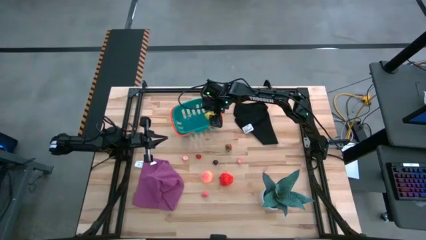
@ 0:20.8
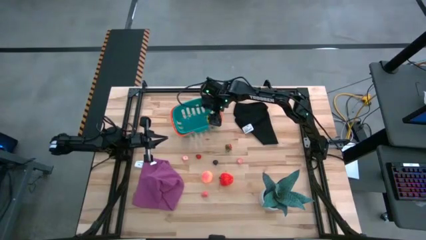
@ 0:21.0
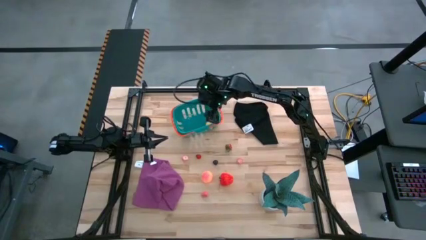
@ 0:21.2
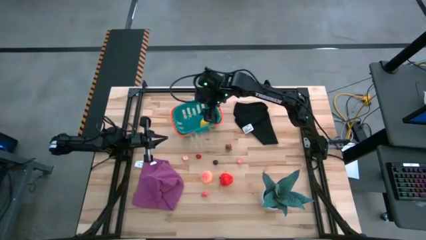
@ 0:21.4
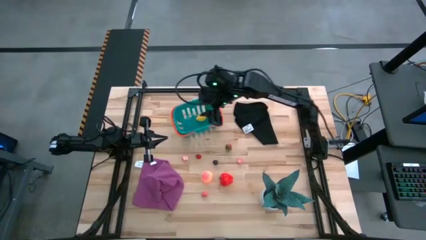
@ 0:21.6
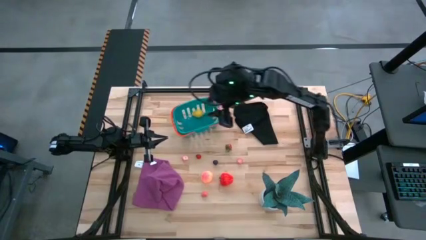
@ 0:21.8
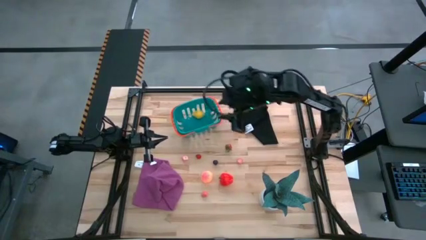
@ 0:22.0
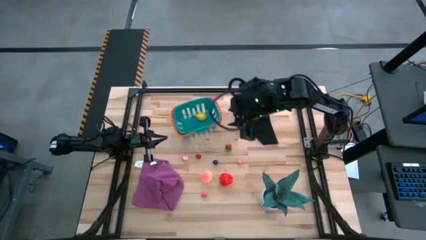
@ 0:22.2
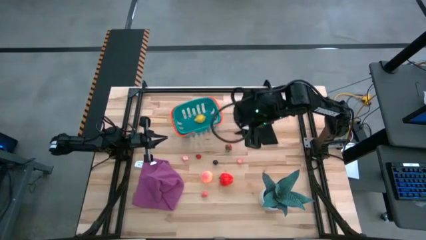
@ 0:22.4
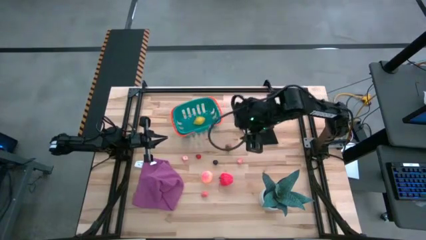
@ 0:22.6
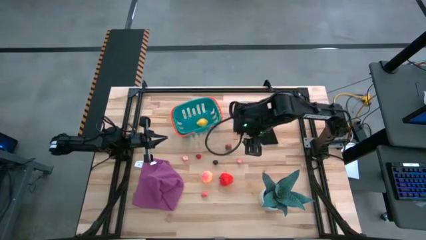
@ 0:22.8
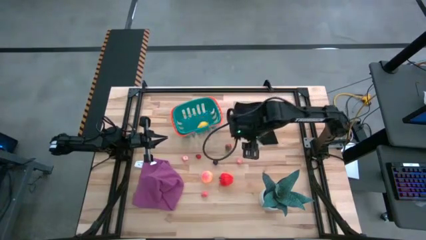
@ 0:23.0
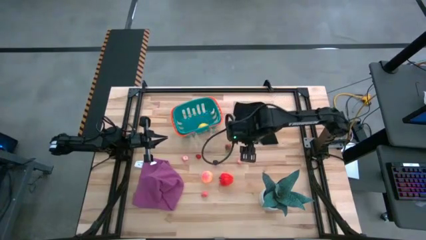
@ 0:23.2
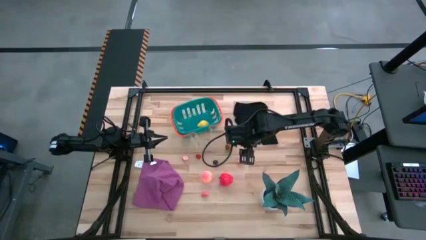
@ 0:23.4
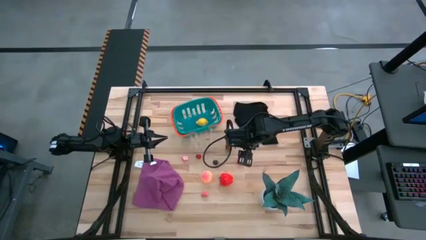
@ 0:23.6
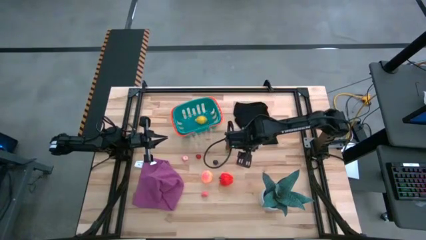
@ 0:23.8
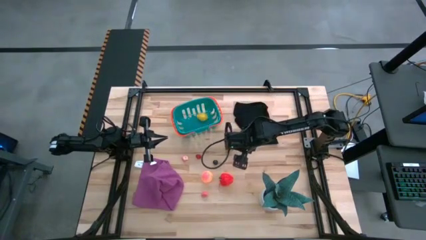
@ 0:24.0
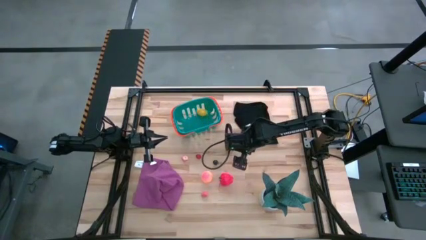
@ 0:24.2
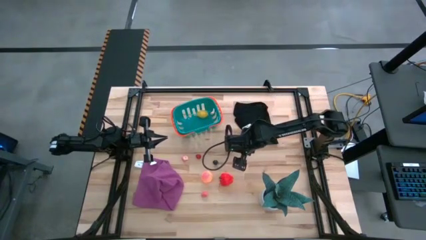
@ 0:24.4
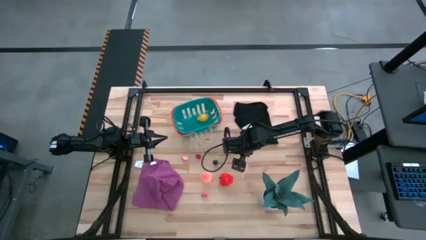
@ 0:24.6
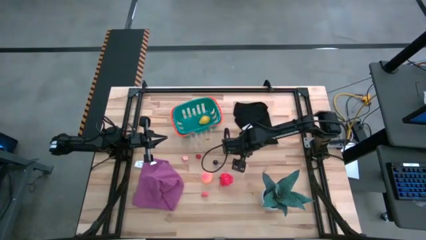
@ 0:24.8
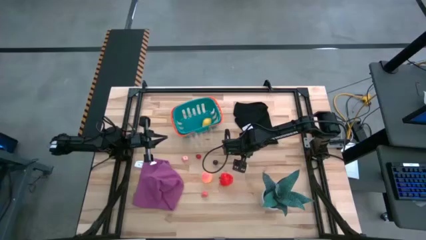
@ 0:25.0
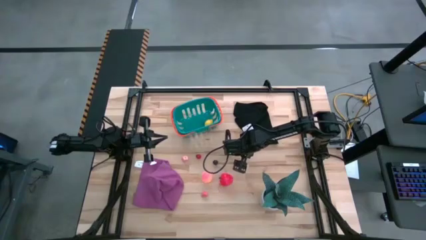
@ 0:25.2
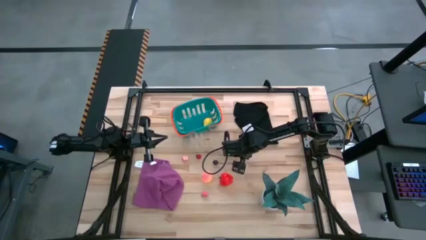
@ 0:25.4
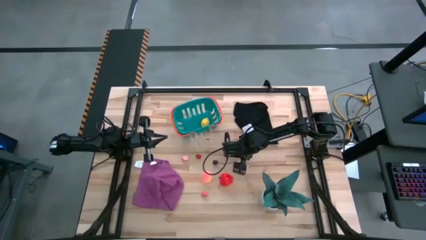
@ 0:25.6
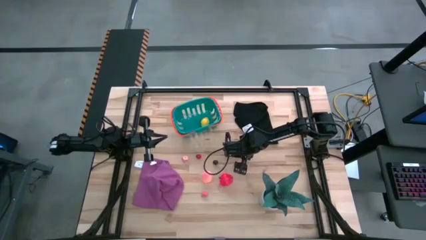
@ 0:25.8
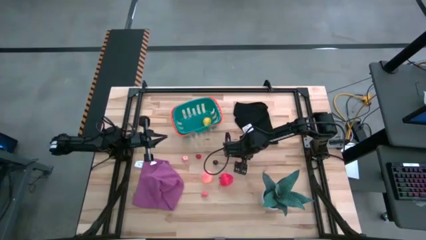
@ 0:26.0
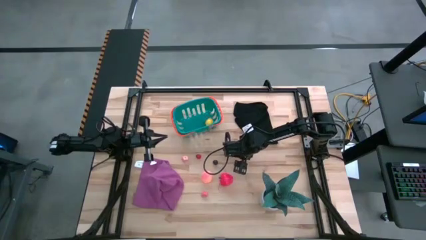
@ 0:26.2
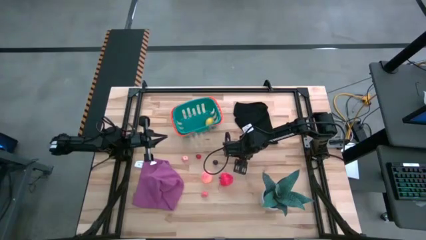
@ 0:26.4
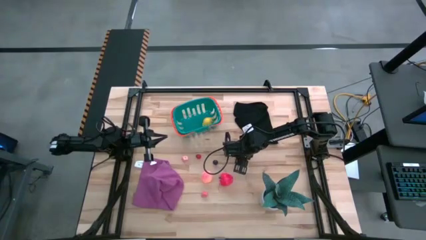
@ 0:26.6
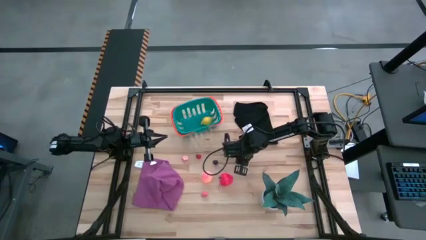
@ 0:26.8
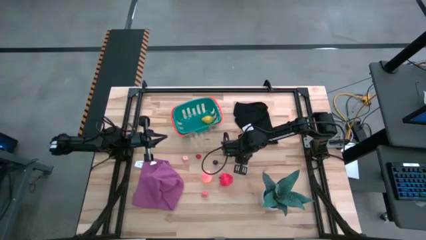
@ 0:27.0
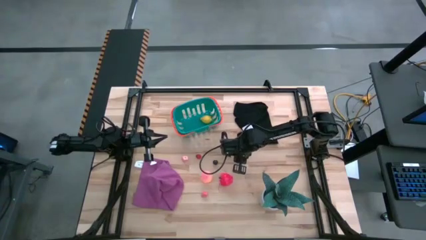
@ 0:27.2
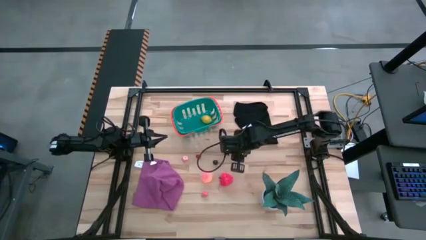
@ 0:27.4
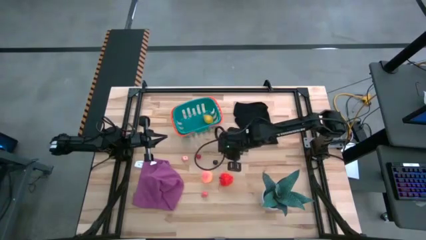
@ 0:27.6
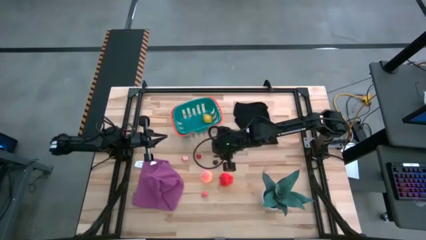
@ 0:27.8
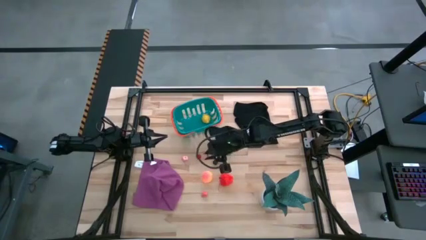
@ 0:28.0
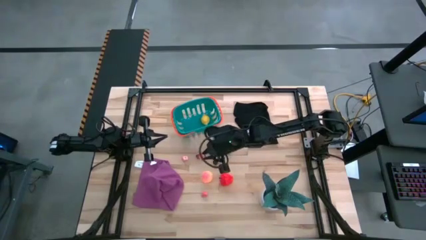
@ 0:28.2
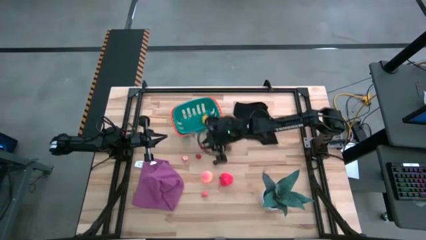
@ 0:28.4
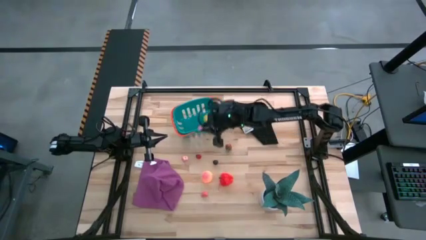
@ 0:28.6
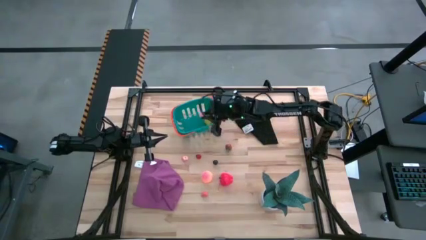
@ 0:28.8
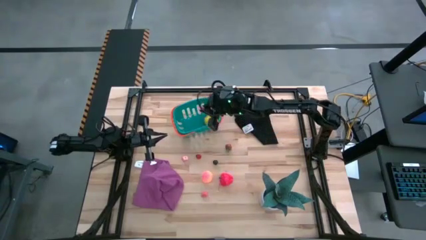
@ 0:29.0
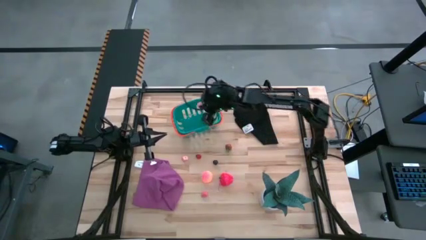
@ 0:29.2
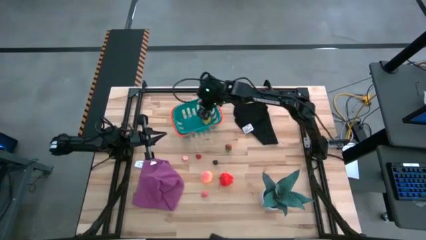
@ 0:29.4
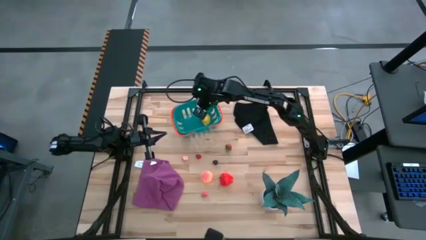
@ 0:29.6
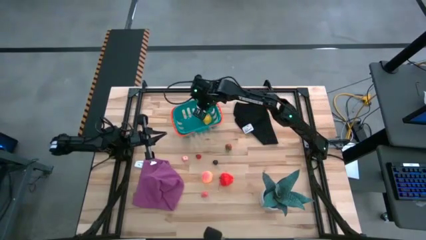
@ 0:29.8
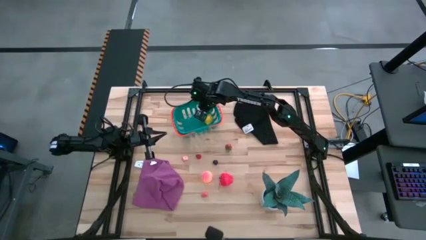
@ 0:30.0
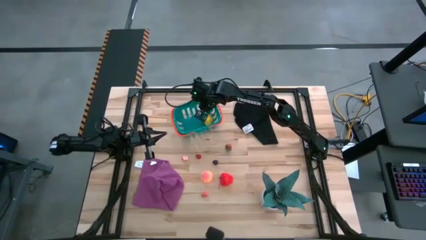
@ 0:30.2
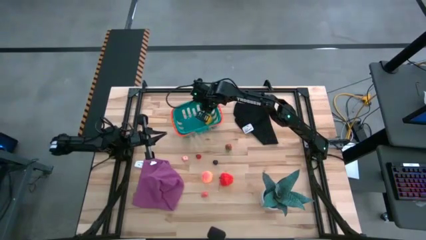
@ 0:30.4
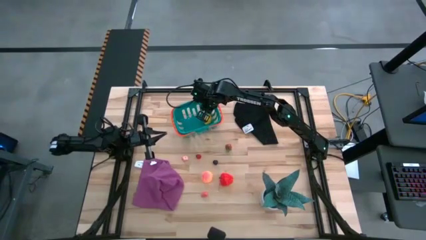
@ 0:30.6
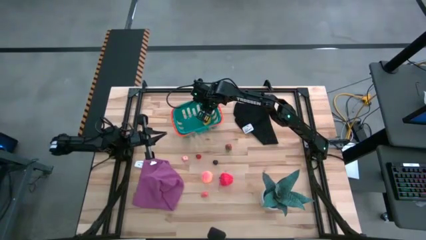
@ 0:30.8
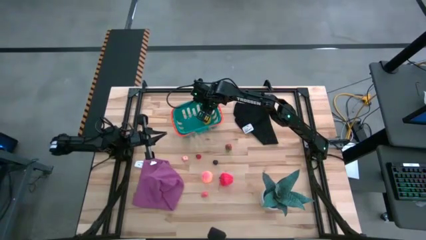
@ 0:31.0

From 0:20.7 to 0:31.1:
Task: Pick and placing Produce into tupperware
Put the top right small pink peach into the basket

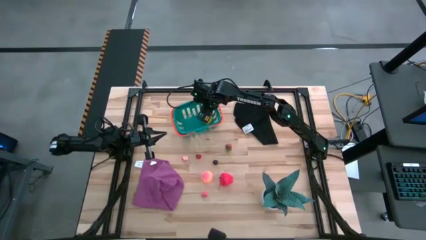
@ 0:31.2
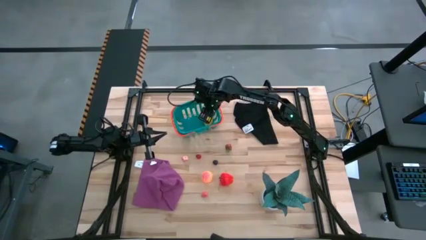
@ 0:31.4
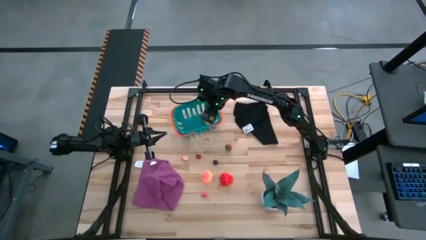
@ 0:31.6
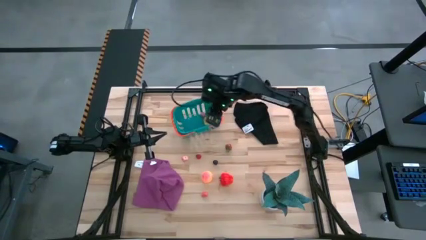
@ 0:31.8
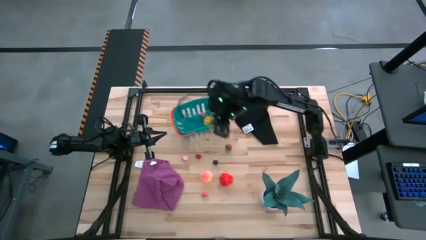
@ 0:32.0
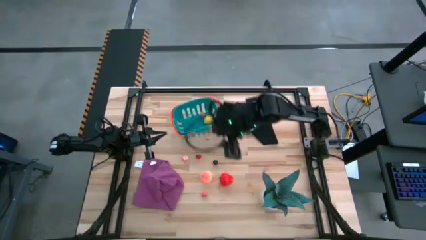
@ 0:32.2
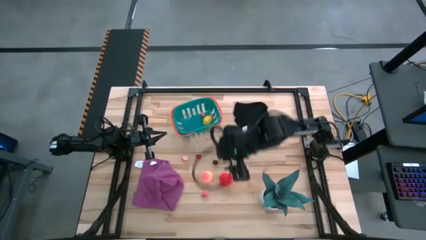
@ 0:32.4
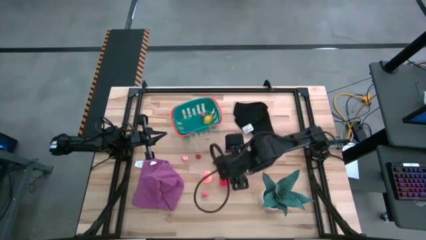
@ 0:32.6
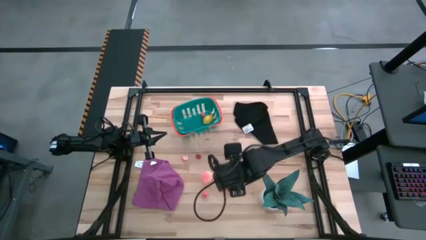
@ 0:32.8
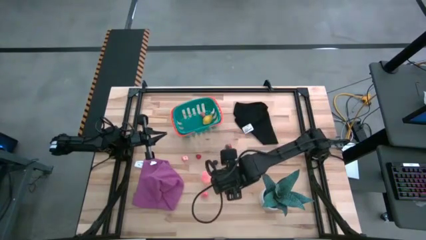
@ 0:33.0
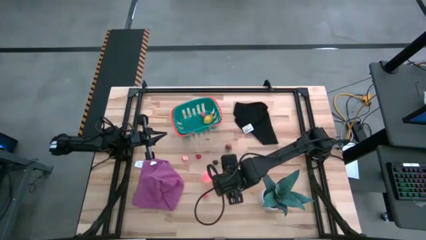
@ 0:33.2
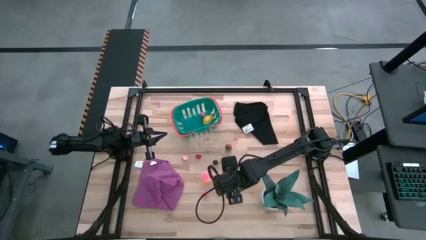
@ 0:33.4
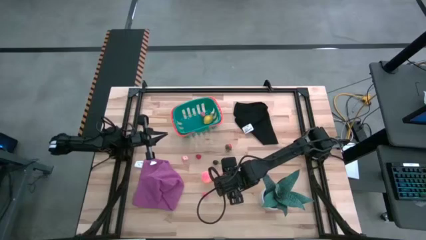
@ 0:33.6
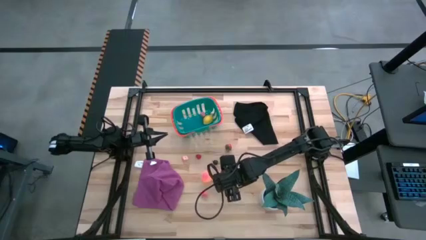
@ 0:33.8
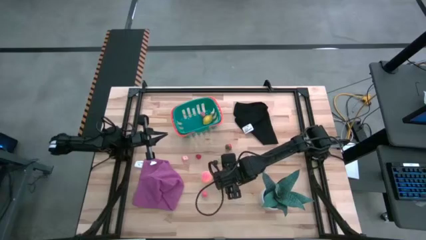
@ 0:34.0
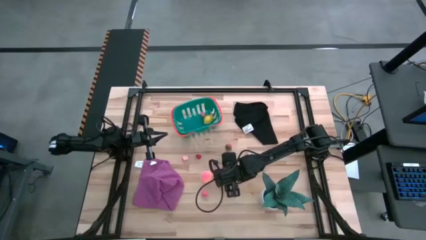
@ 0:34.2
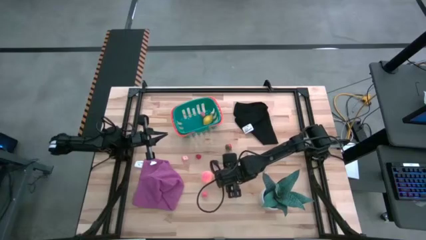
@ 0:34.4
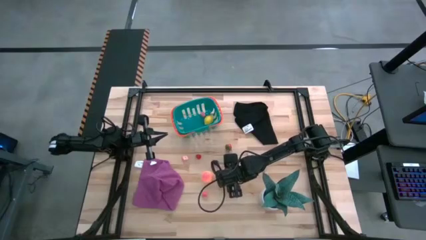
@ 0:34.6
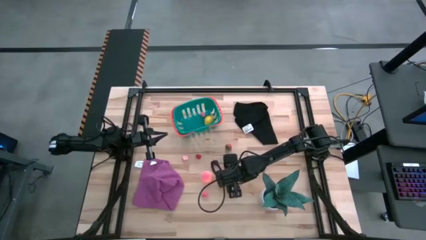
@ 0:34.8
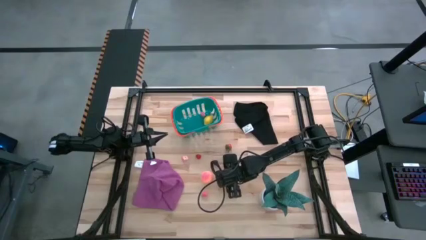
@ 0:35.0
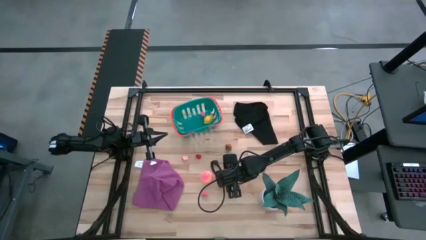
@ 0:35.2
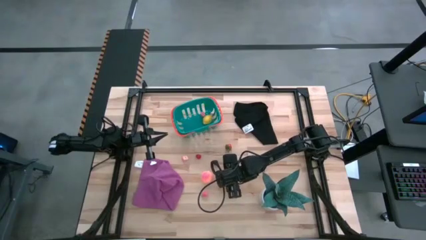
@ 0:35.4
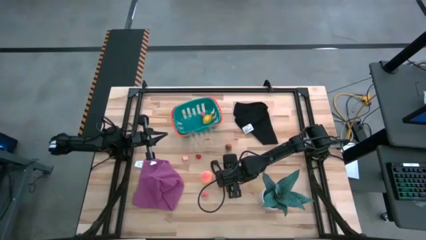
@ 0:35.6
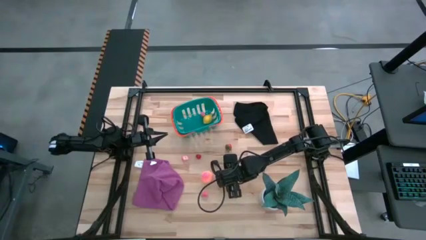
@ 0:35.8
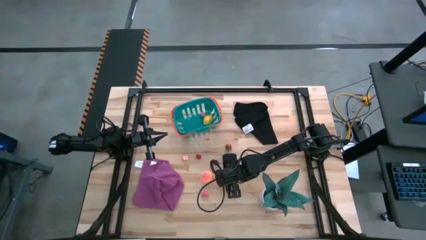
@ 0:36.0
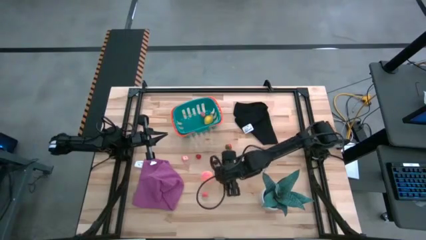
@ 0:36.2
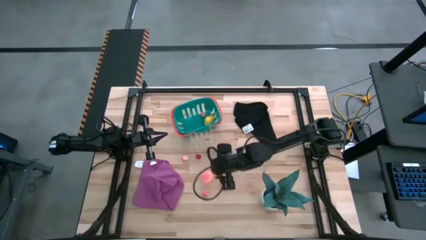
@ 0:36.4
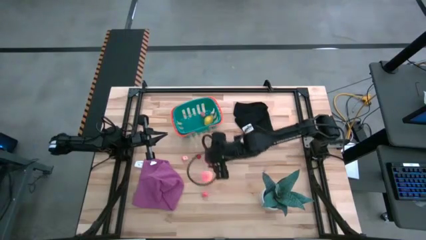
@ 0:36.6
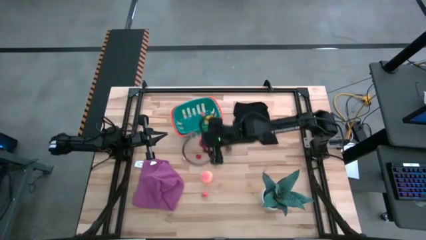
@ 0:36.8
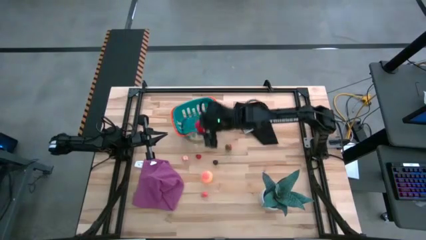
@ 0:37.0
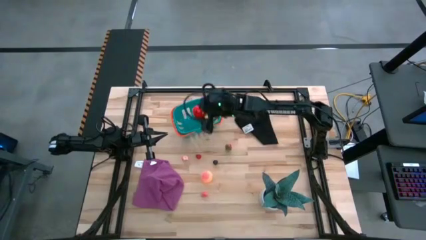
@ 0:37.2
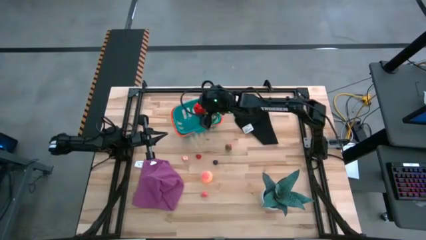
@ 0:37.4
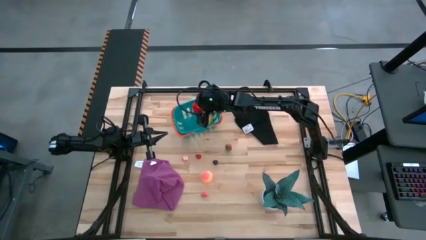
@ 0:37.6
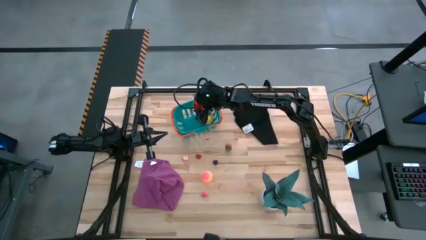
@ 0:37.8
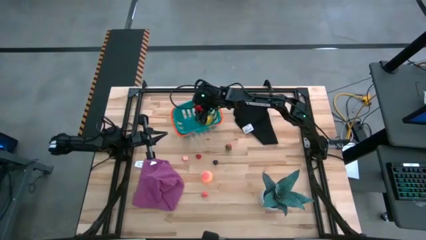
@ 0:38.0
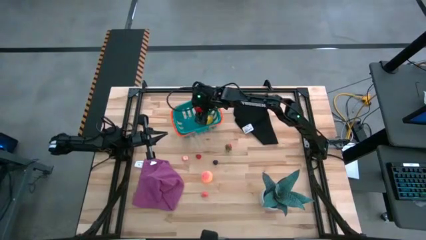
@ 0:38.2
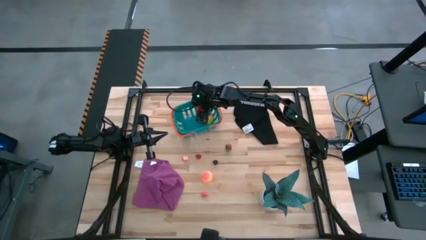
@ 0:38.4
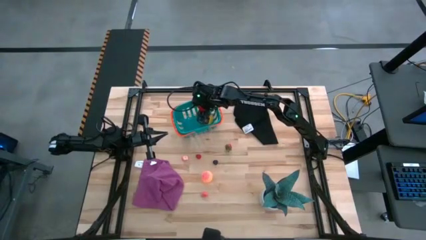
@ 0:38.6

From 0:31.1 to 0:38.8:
Put the red apple into the basket
